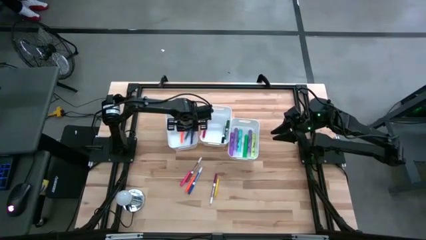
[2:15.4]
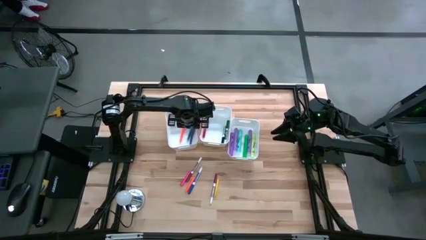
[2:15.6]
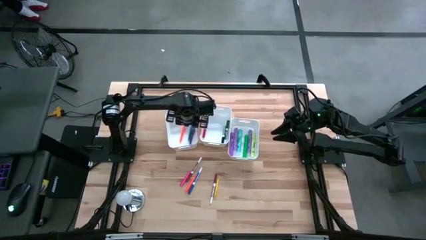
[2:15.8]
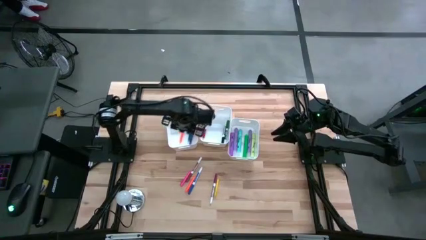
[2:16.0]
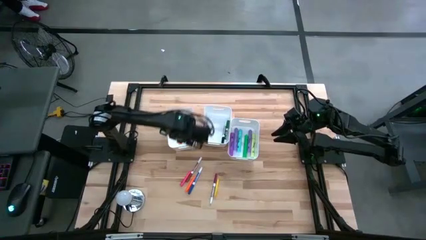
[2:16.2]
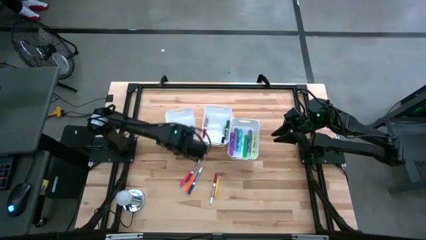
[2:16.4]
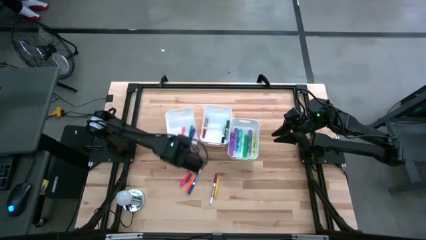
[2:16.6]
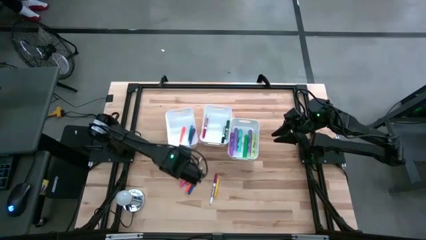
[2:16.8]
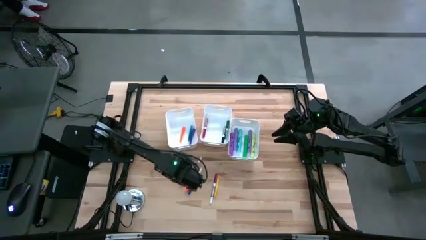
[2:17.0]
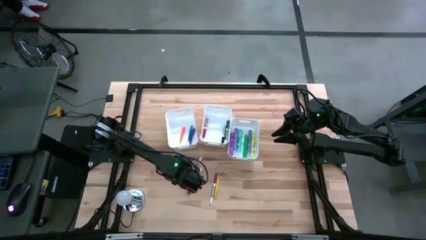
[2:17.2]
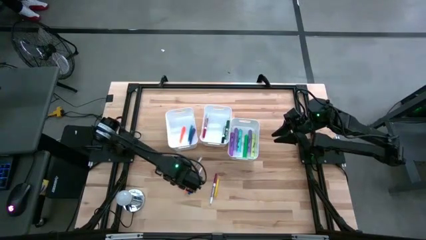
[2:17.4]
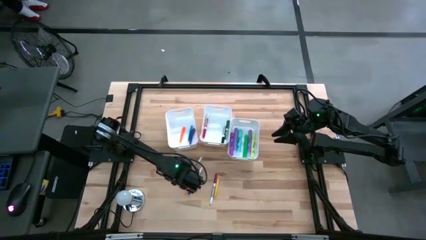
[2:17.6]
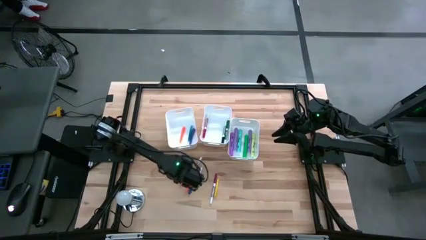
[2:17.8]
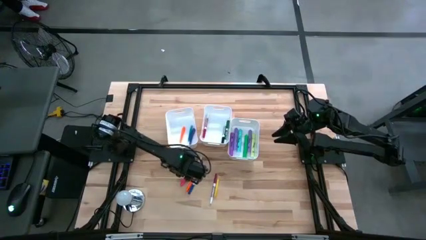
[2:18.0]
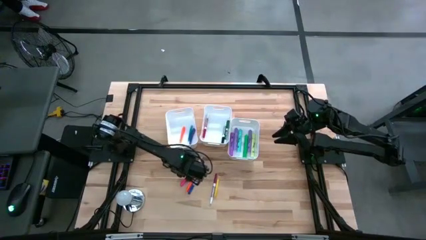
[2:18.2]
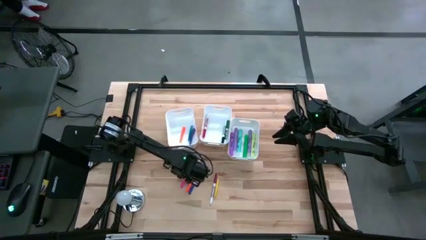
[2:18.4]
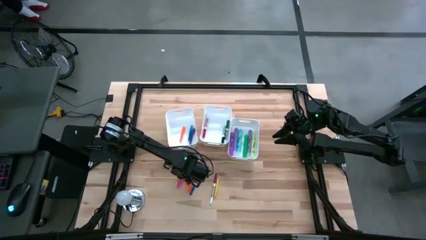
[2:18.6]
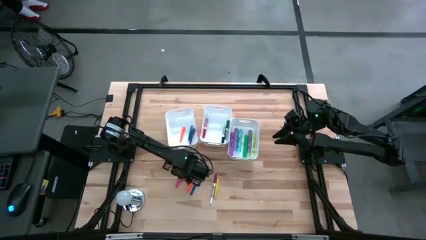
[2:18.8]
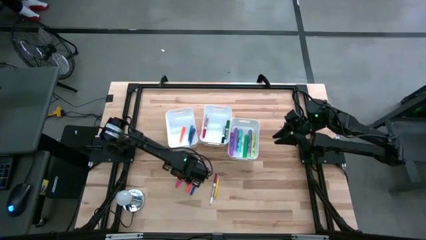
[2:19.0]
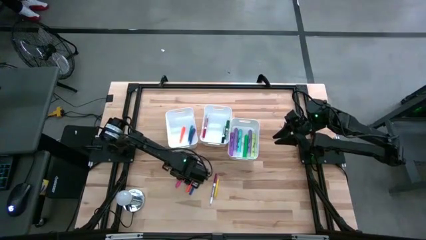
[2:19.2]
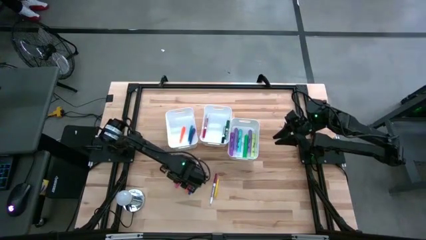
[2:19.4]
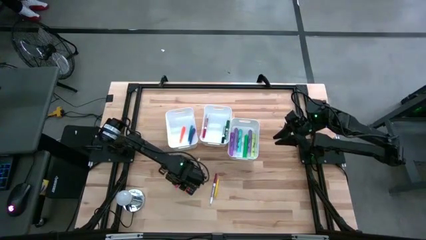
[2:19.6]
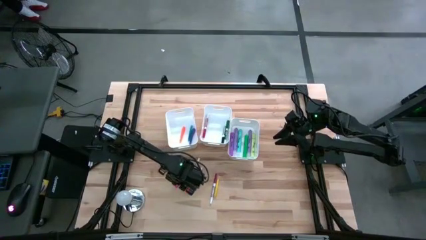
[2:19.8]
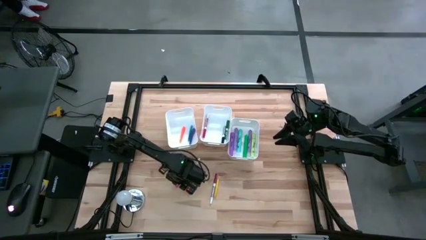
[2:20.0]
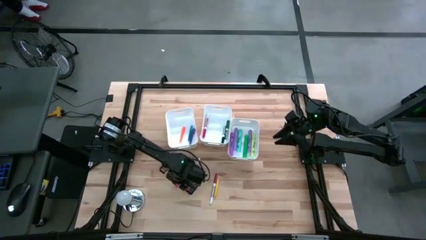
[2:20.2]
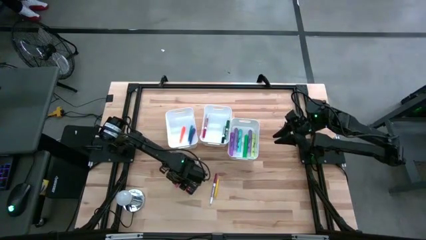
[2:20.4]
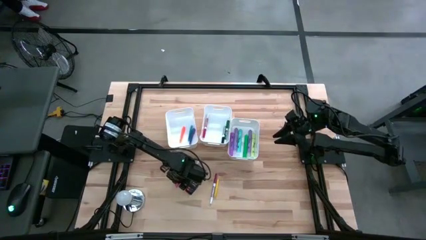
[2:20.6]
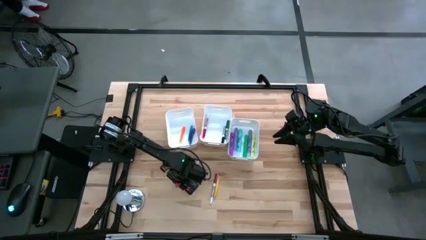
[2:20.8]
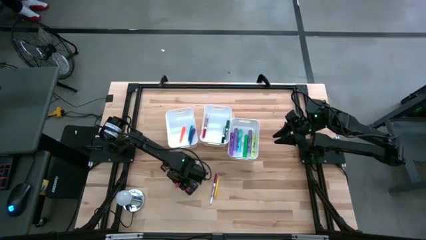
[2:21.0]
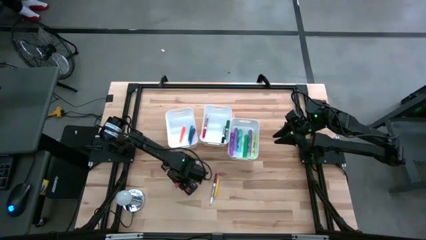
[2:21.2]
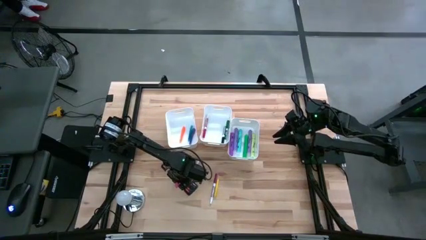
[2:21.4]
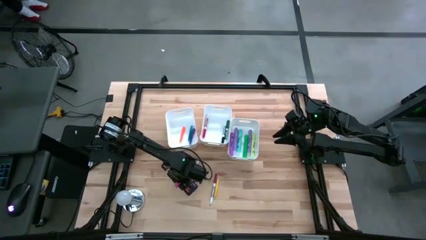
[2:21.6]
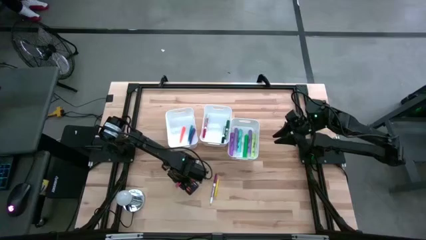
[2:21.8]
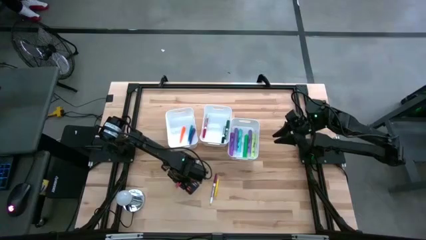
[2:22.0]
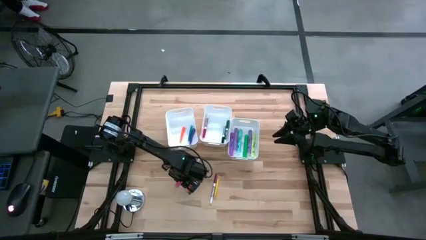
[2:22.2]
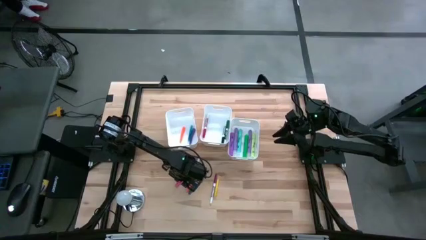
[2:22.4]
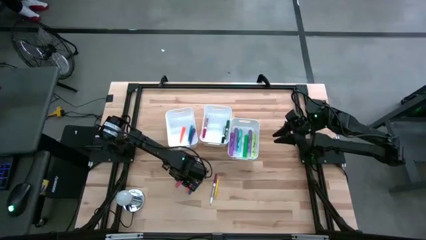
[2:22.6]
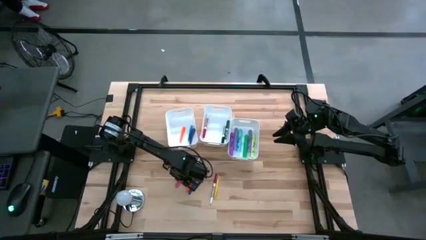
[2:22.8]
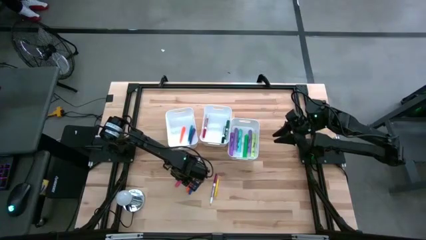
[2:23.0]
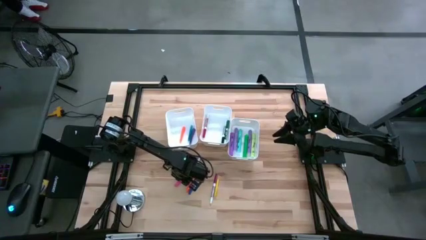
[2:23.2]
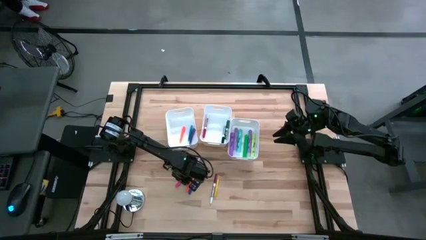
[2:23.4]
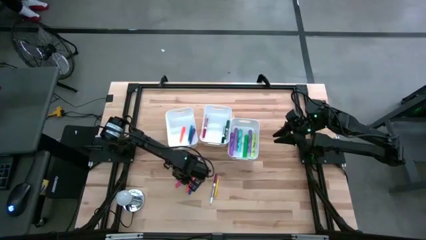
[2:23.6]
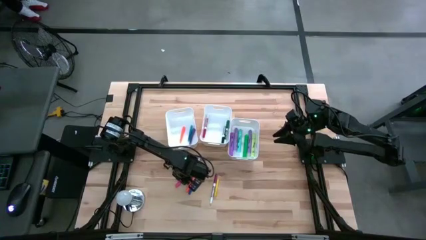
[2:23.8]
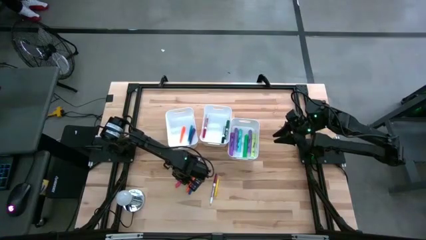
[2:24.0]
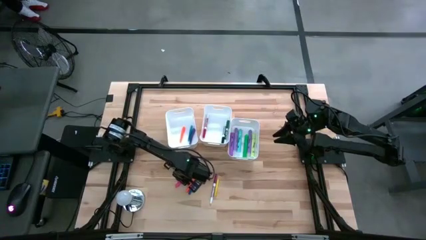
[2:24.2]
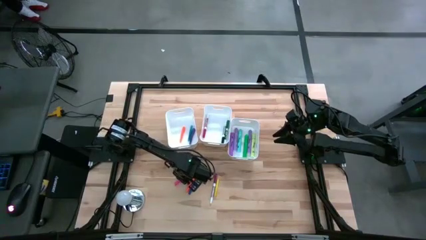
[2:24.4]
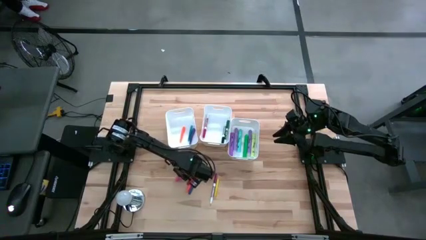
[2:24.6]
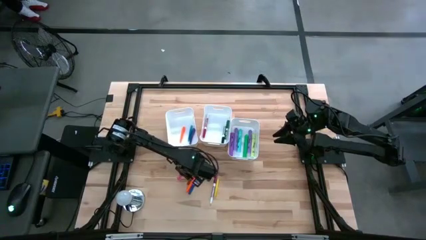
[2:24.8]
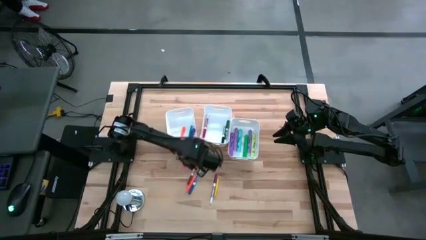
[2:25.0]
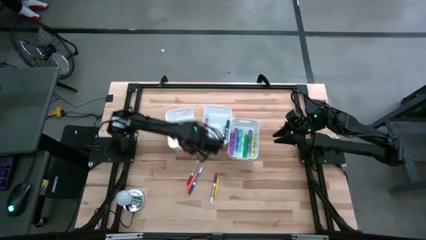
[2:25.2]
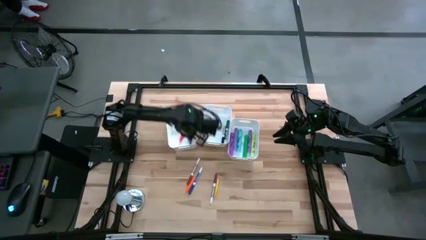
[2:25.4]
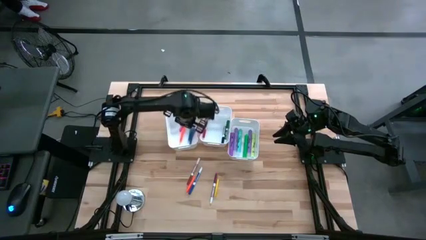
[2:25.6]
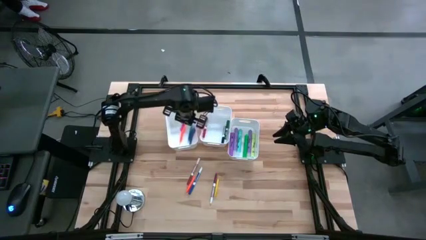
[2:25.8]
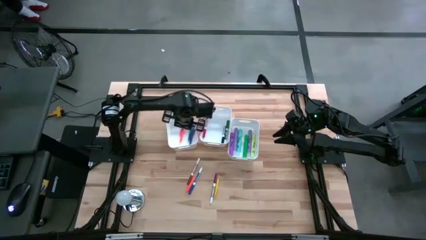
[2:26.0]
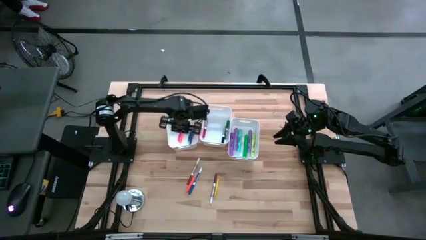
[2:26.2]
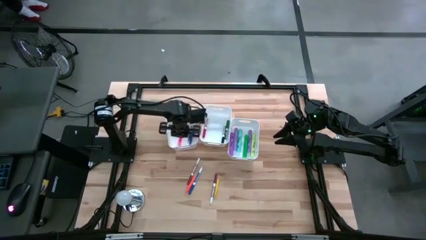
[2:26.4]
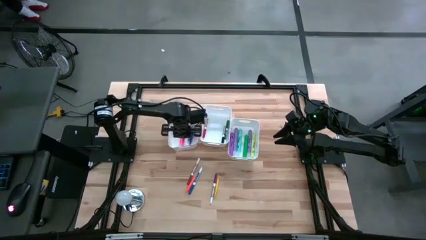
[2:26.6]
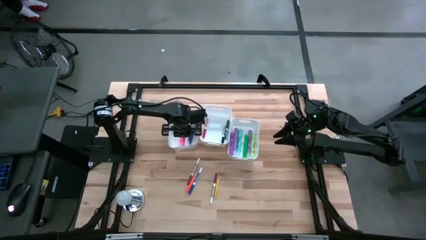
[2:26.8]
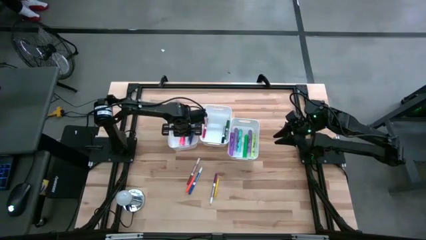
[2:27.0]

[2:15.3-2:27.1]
Task: Pick & Place Markers
Put the pink pen into the left white bin

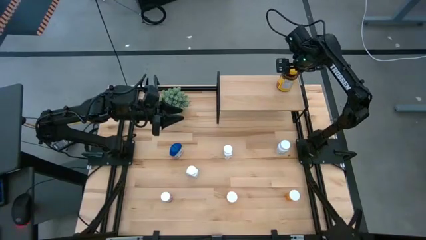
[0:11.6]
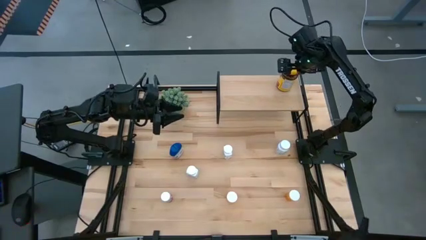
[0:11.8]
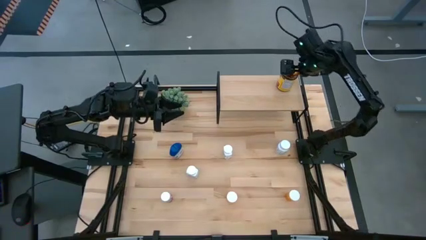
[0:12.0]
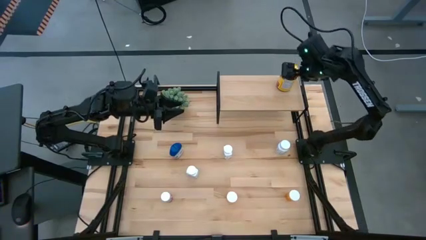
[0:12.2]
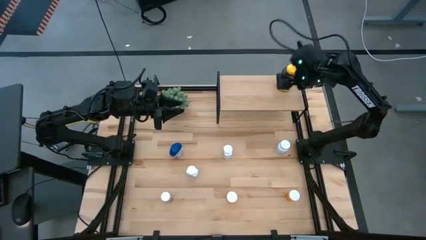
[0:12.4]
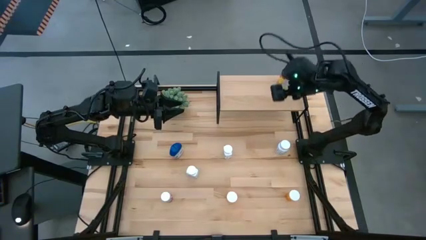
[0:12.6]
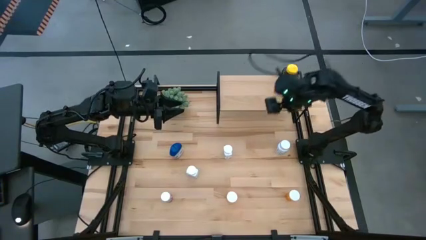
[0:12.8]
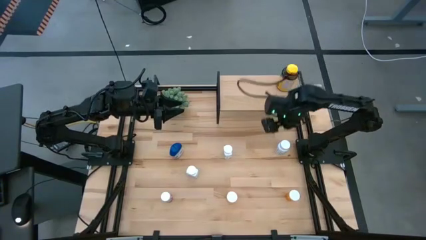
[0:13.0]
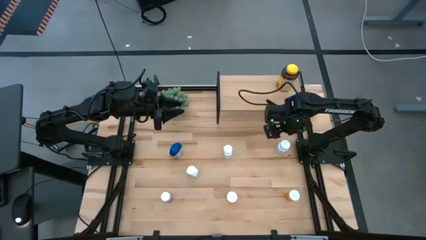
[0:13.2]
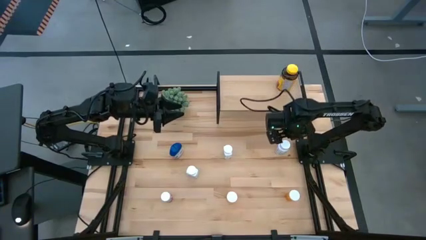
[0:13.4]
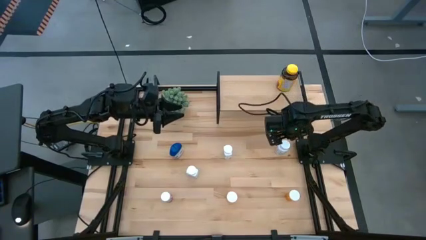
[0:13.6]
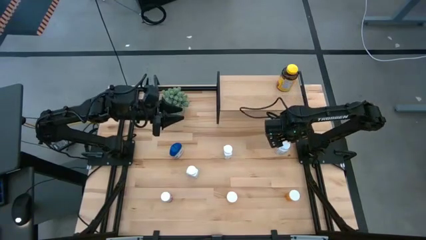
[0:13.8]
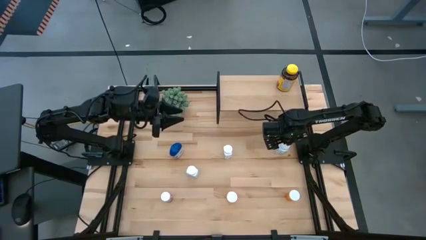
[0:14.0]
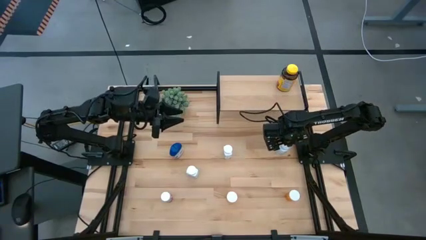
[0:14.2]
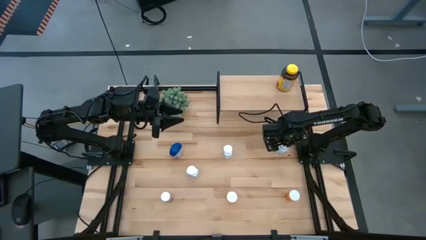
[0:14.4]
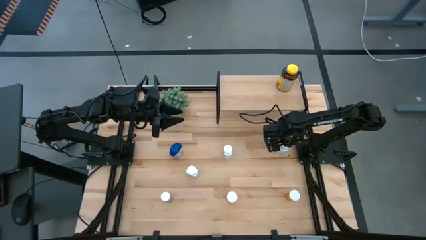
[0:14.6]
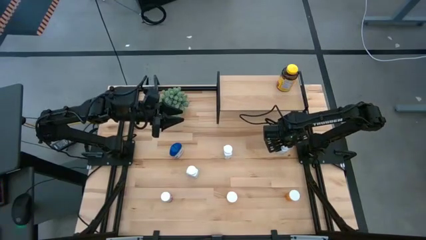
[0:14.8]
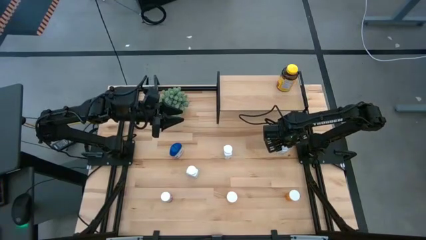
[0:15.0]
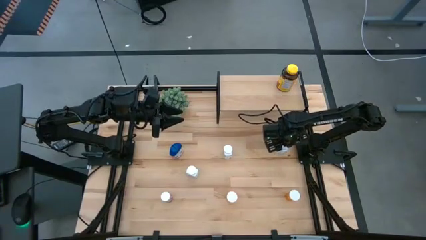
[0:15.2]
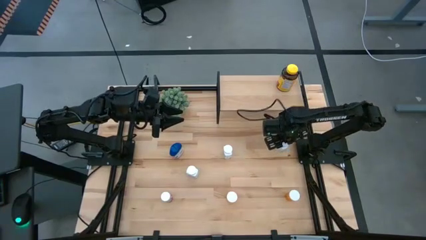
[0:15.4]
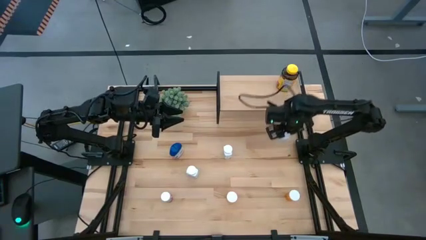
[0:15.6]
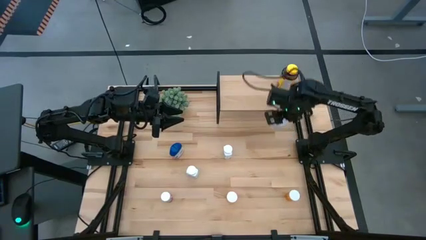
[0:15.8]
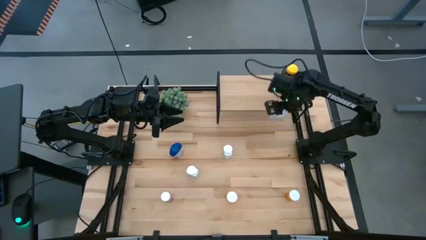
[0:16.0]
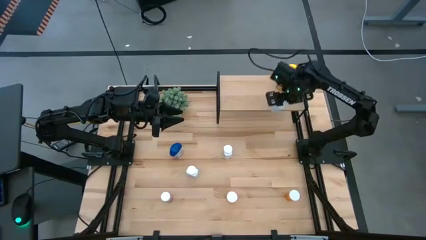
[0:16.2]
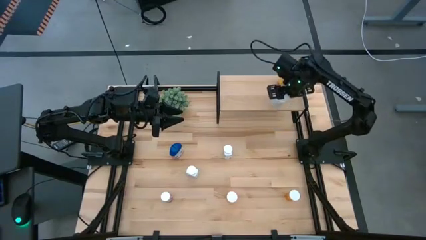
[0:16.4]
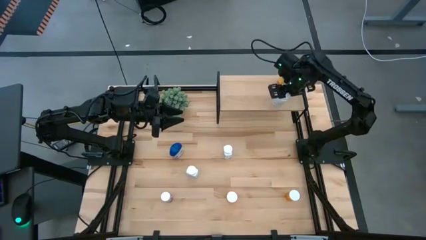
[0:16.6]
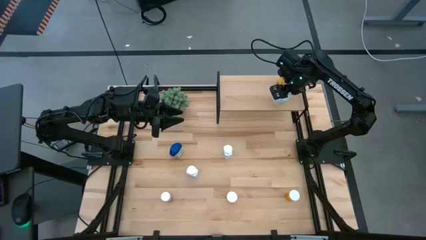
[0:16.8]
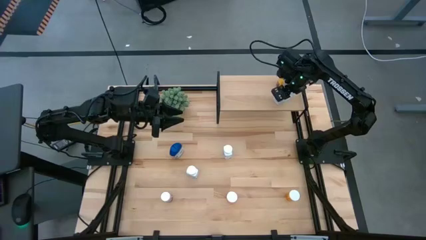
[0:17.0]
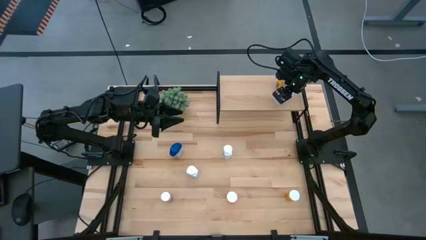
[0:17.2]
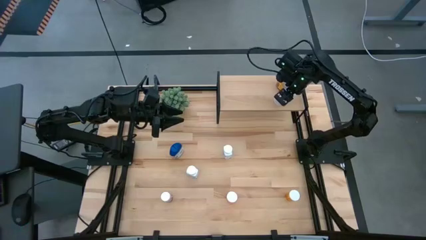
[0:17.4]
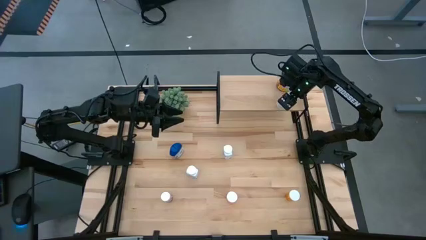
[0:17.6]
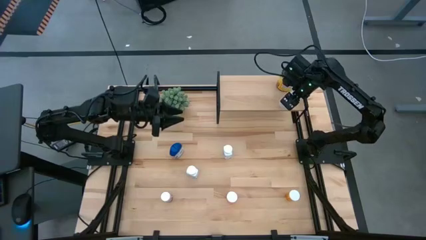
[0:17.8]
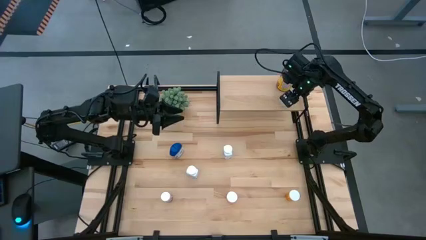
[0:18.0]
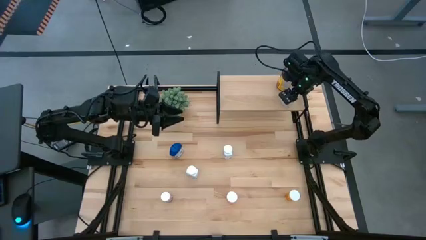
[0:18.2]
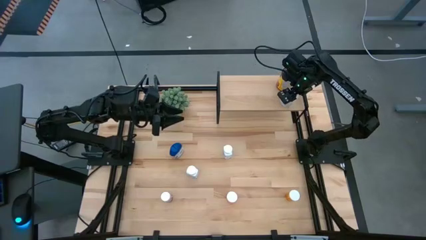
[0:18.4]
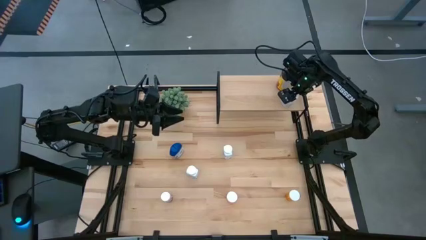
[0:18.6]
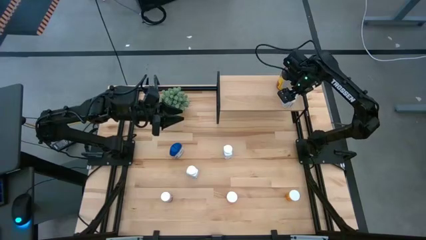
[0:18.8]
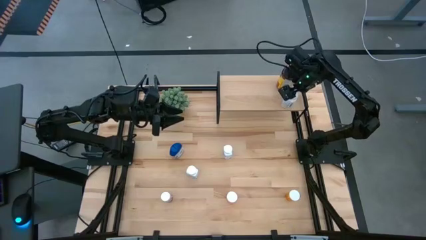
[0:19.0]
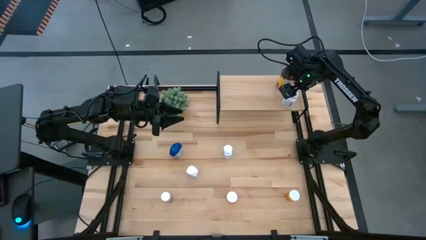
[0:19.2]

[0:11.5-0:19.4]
Task: Pick and place medicine bottles onto shelf by color
Put the white and black medicine bottle on the shelf
